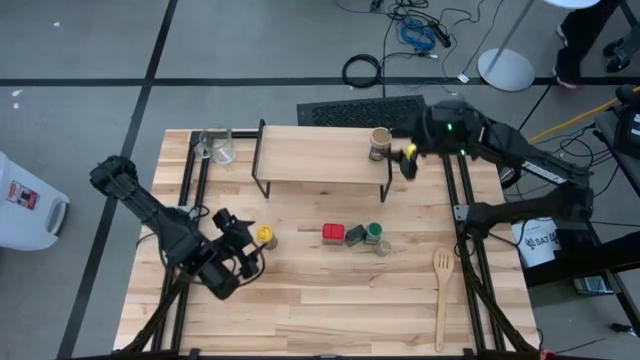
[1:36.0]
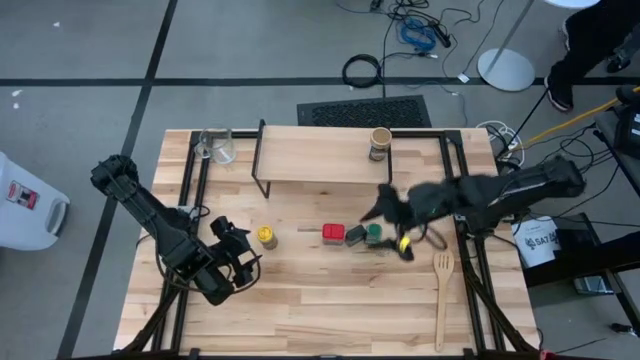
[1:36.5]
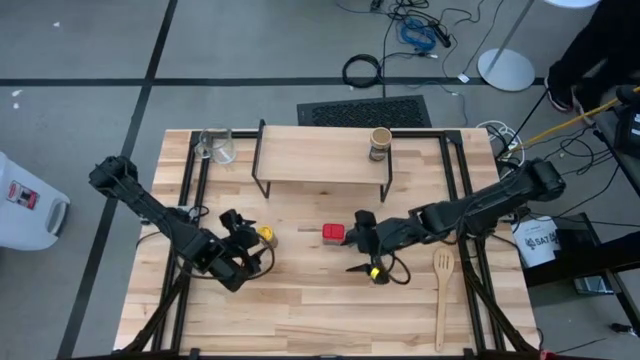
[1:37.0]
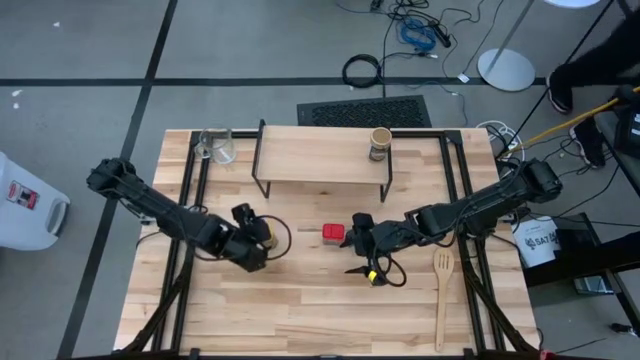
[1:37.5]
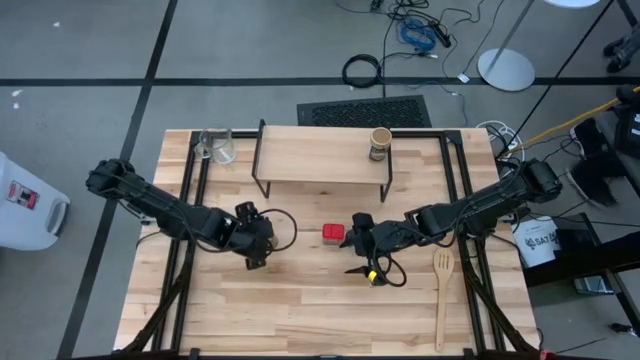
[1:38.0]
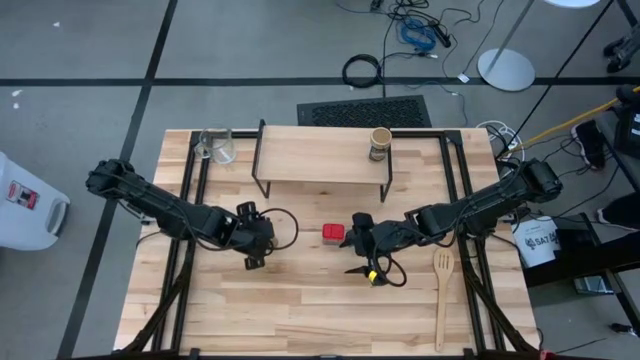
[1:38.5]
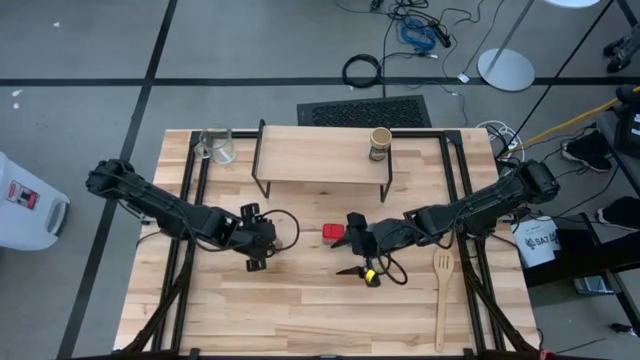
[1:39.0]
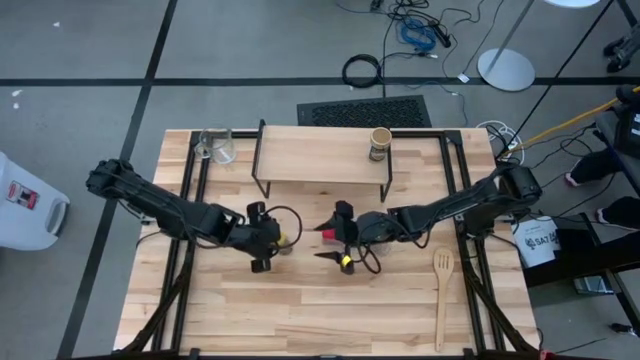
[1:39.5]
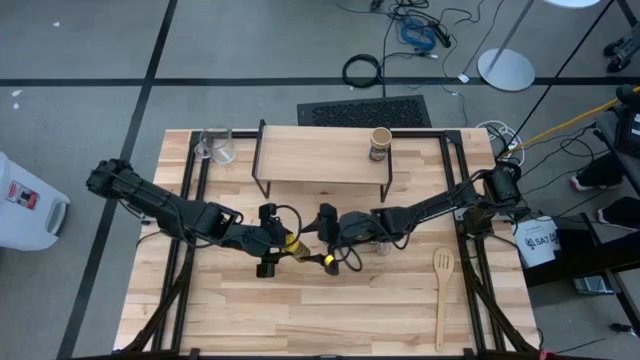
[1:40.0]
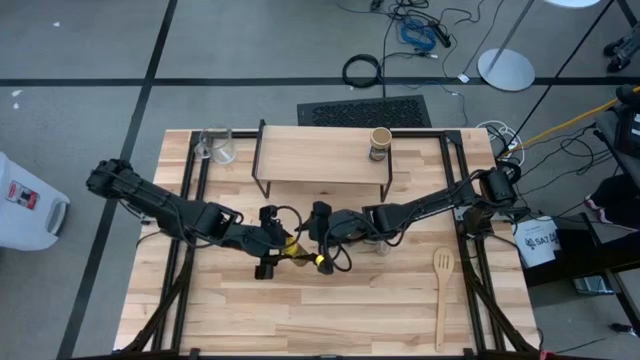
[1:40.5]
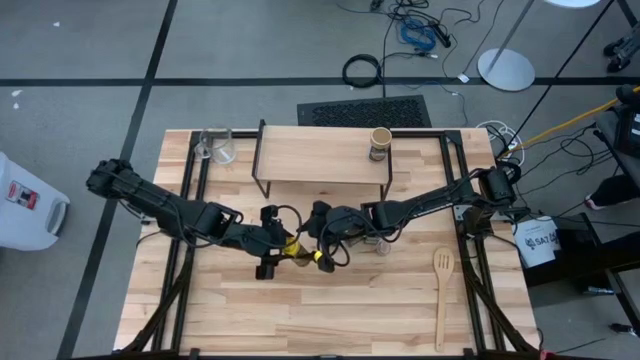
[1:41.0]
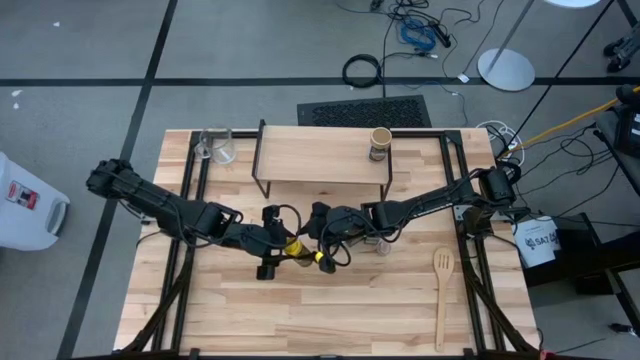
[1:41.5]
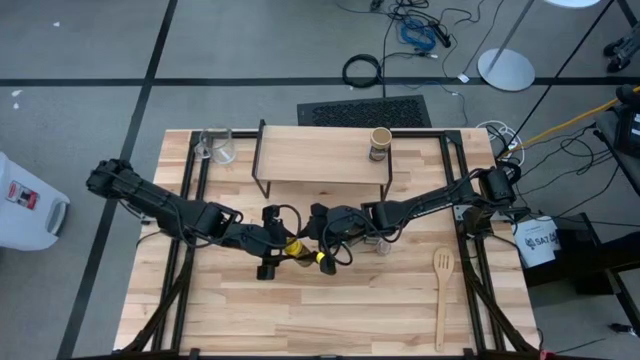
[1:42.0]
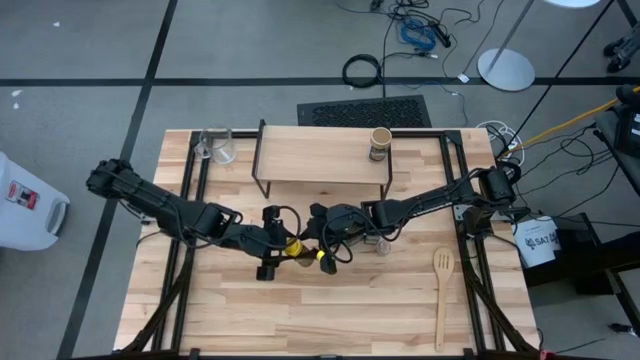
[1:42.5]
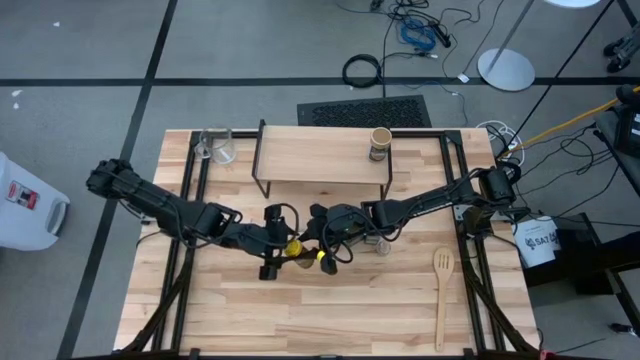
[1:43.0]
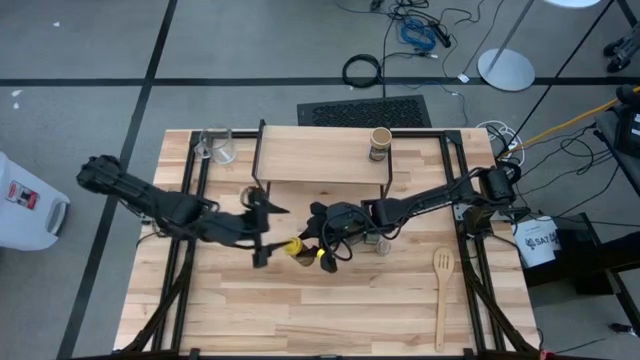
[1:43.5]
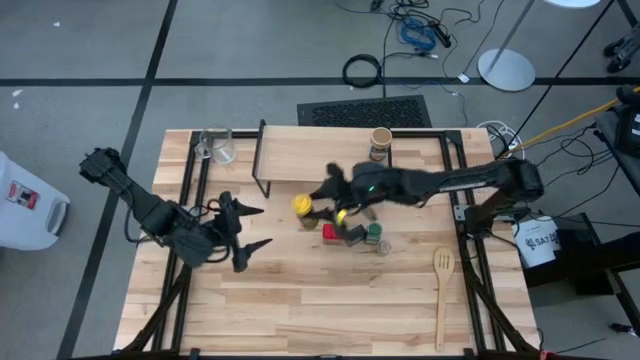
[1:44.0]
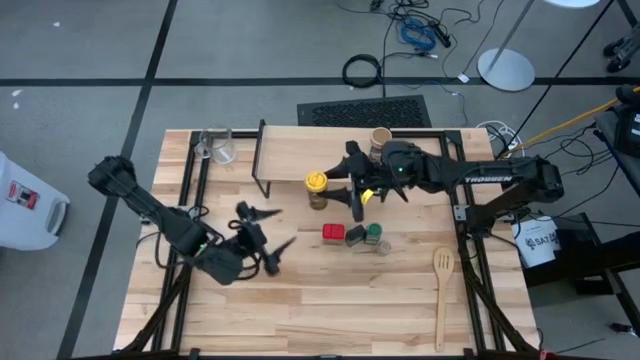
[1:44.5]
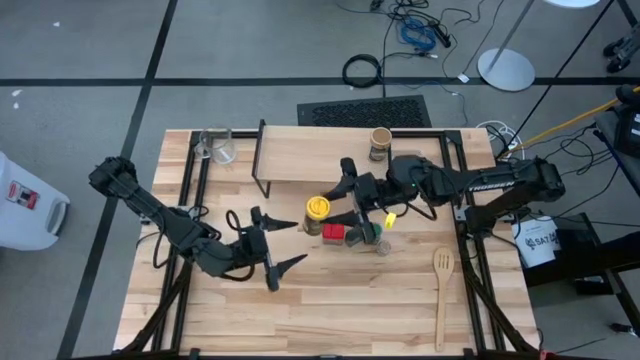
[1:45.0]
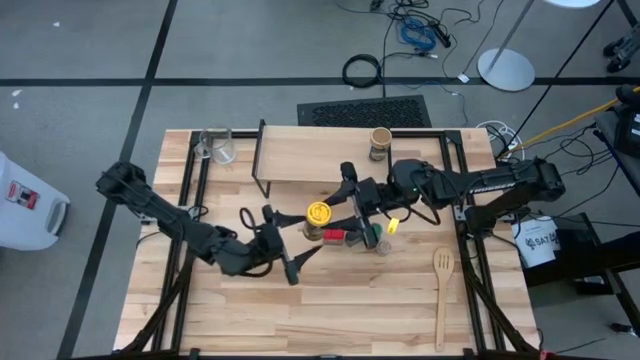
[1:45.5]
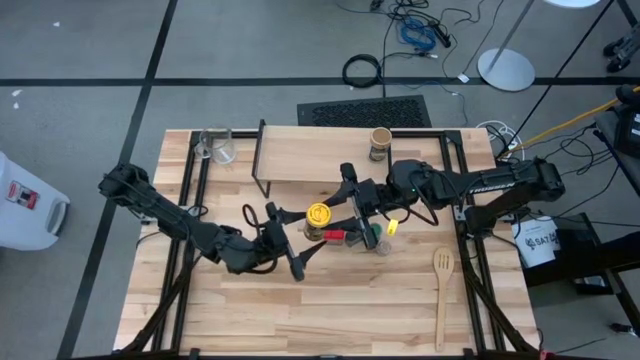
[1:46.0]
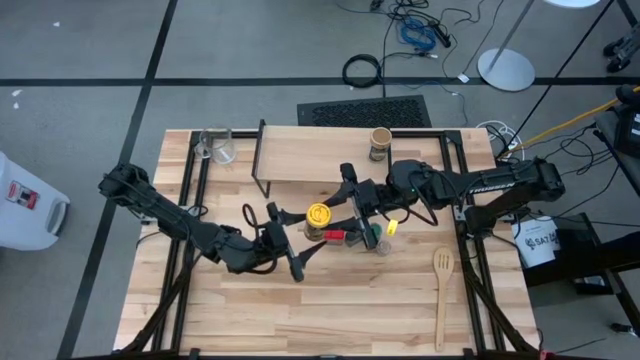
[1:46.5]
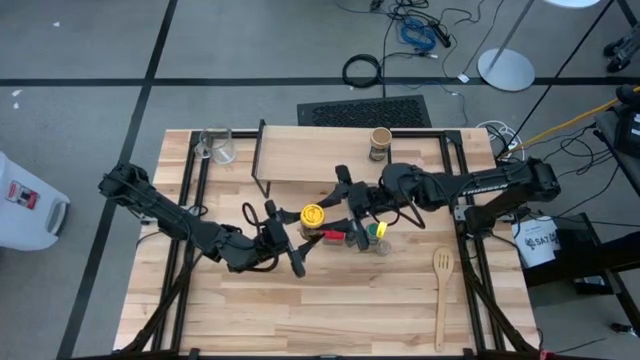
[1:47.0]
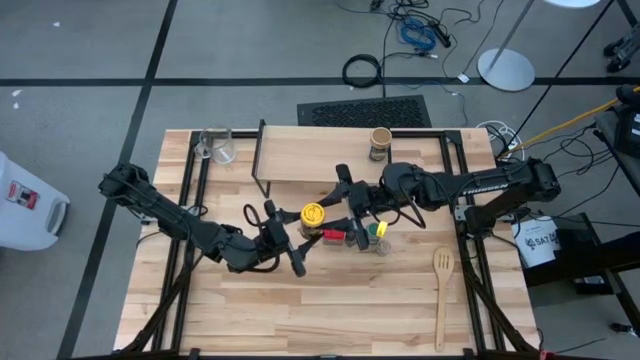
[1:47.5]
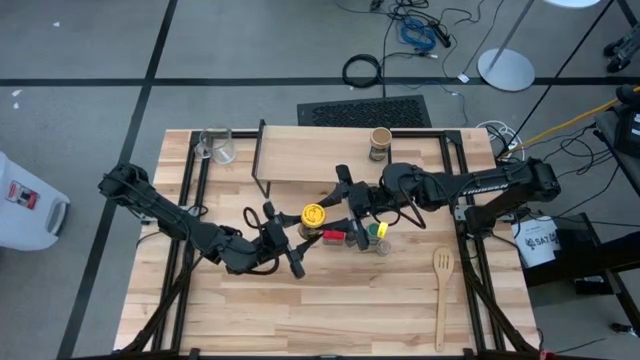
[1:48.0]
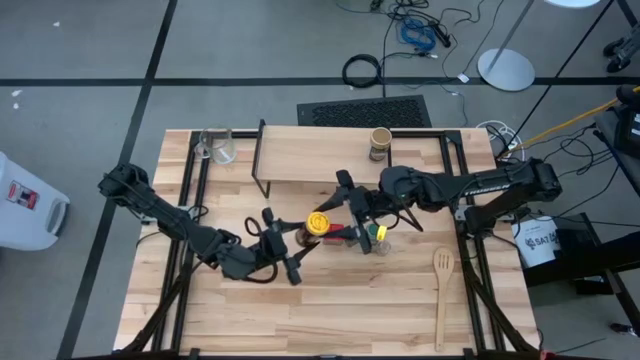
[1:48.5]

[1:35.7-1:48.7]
Task: Shelf spices
Put the yellow seasoning bottle on the shelf
